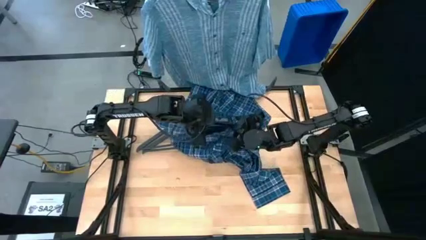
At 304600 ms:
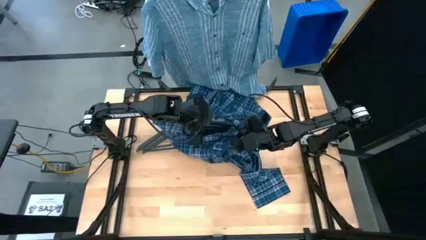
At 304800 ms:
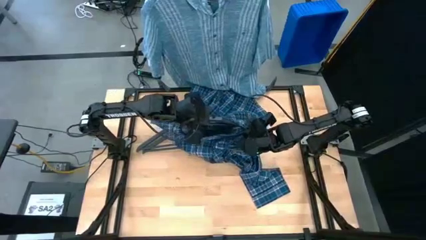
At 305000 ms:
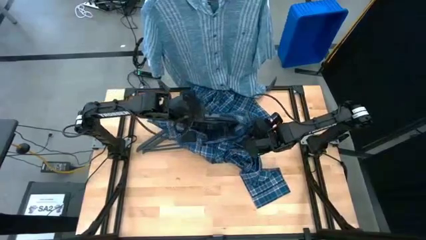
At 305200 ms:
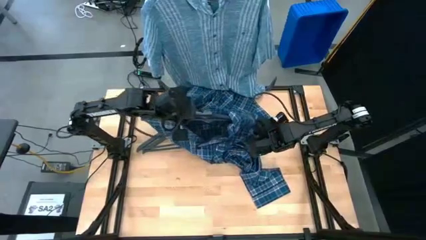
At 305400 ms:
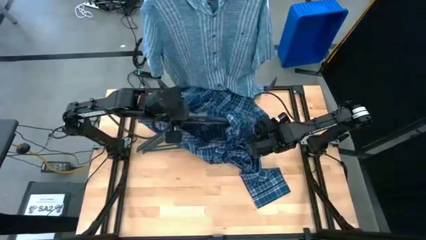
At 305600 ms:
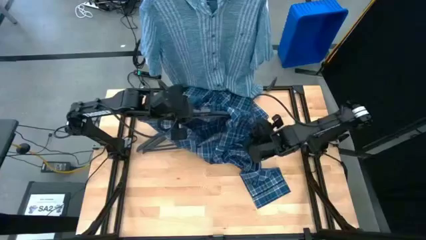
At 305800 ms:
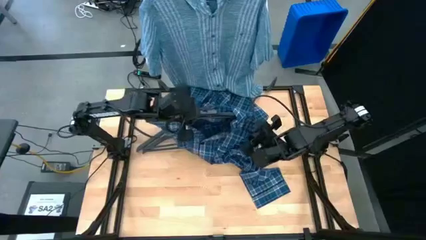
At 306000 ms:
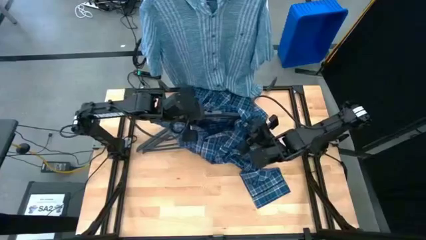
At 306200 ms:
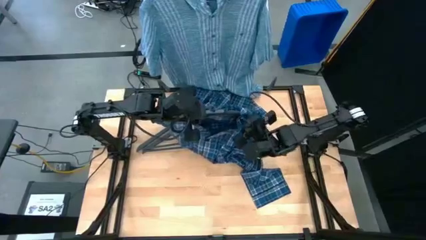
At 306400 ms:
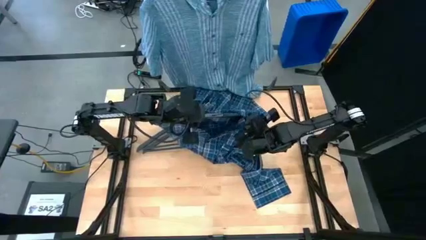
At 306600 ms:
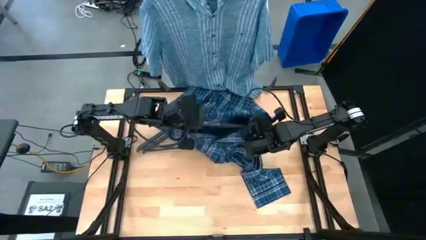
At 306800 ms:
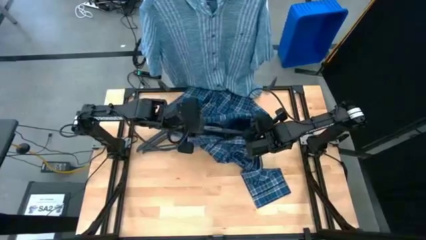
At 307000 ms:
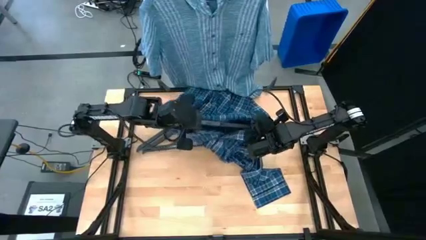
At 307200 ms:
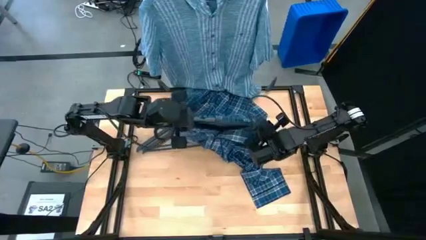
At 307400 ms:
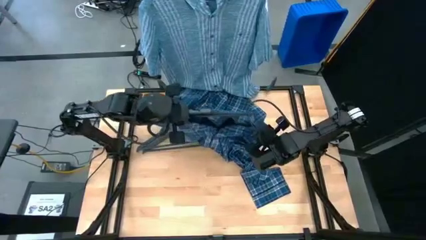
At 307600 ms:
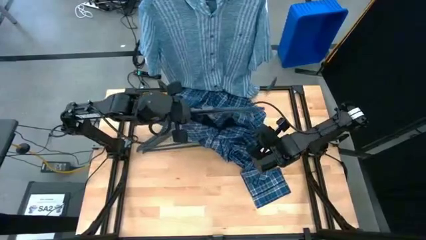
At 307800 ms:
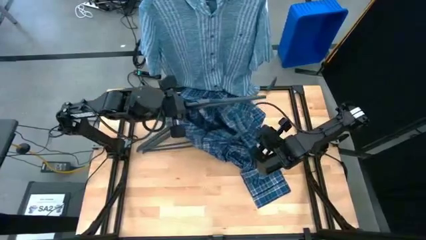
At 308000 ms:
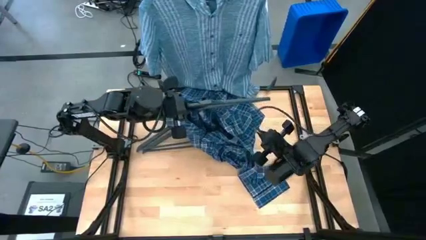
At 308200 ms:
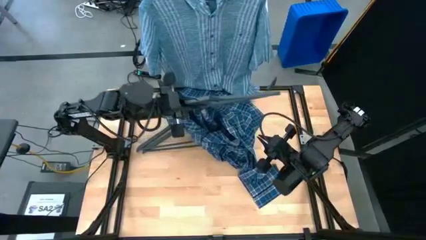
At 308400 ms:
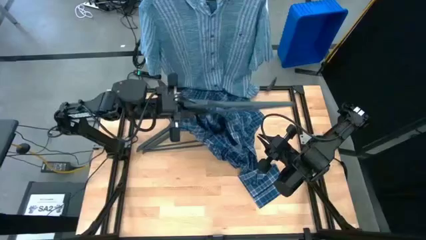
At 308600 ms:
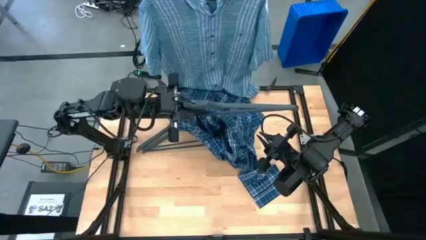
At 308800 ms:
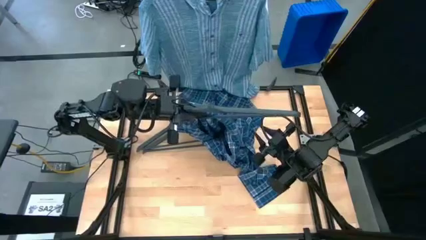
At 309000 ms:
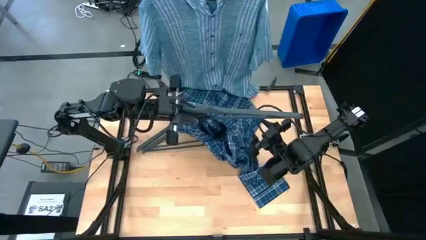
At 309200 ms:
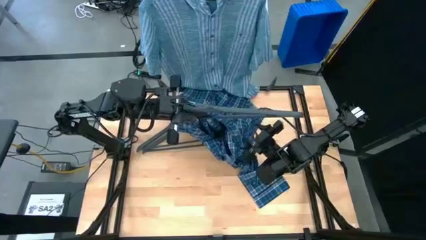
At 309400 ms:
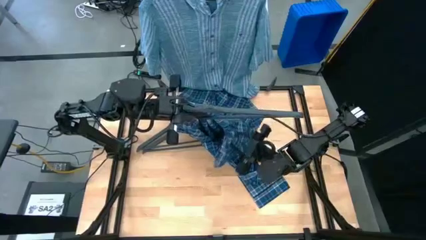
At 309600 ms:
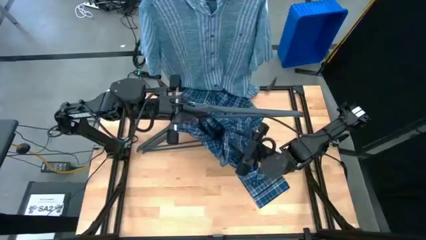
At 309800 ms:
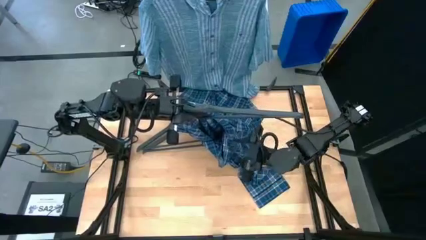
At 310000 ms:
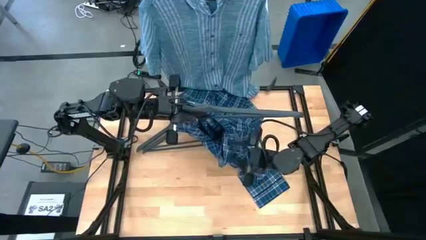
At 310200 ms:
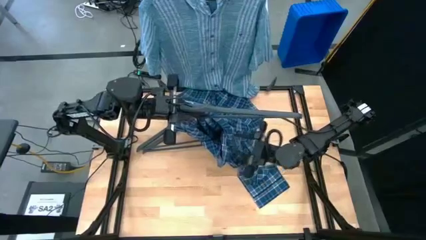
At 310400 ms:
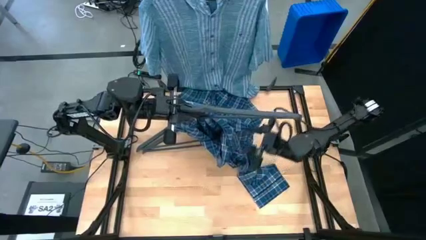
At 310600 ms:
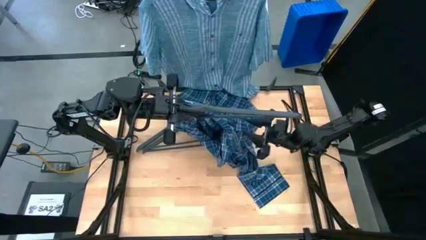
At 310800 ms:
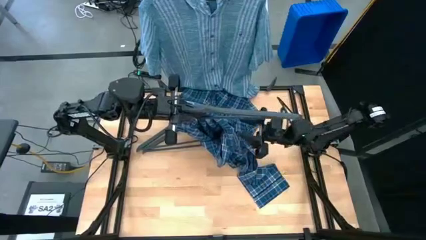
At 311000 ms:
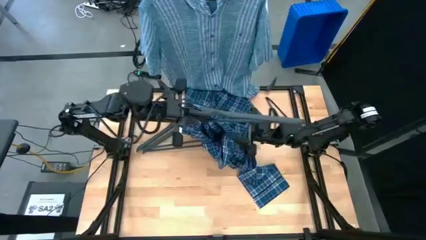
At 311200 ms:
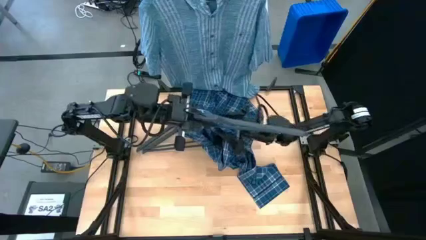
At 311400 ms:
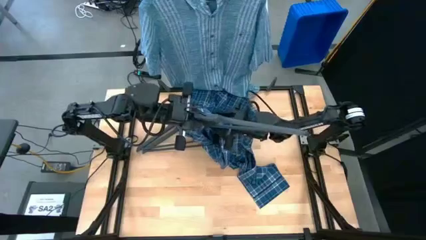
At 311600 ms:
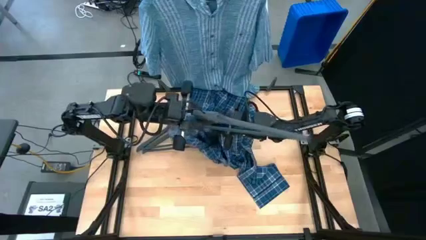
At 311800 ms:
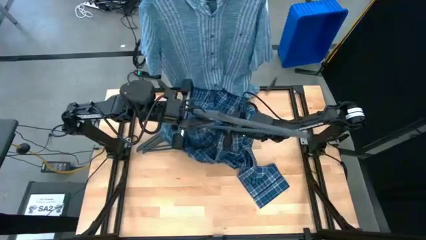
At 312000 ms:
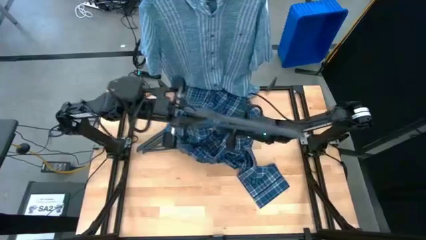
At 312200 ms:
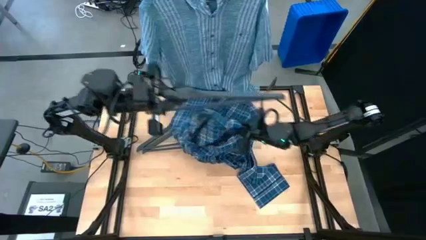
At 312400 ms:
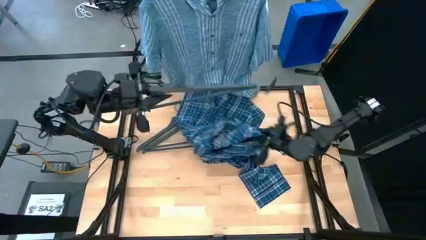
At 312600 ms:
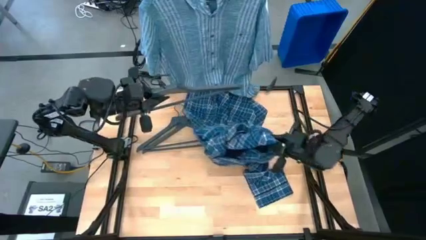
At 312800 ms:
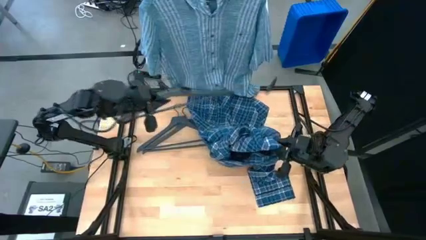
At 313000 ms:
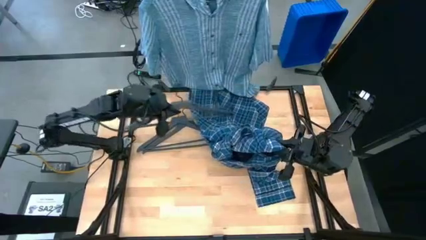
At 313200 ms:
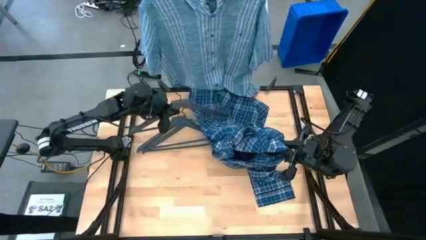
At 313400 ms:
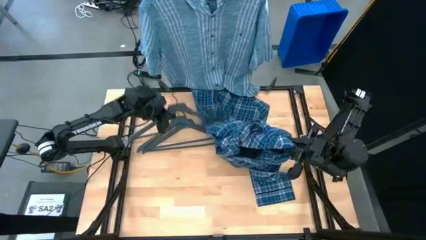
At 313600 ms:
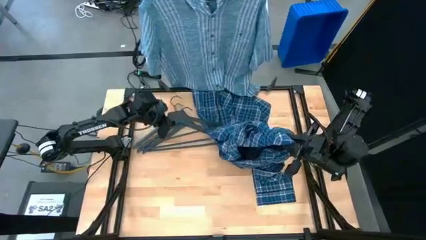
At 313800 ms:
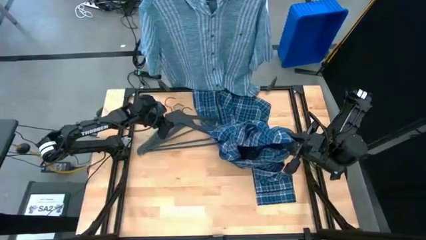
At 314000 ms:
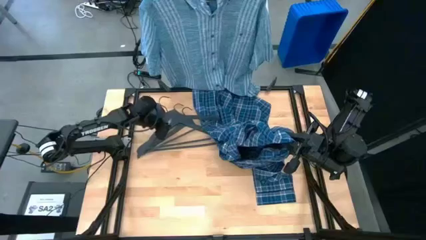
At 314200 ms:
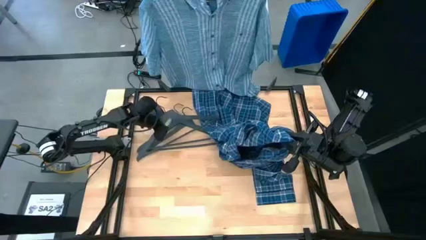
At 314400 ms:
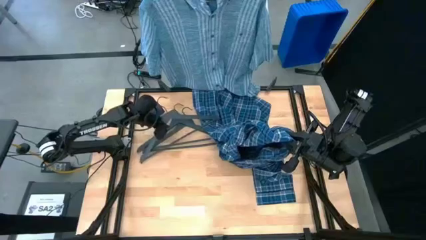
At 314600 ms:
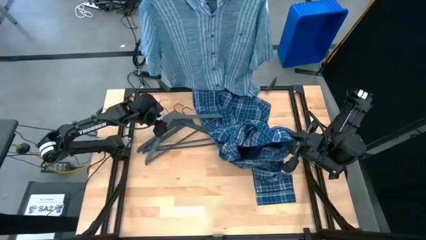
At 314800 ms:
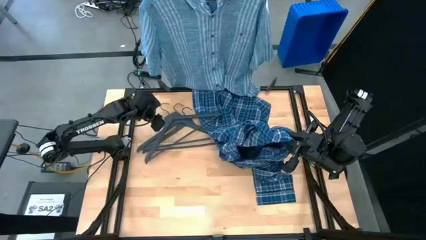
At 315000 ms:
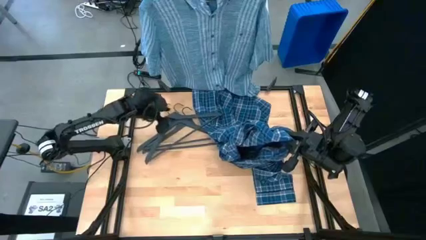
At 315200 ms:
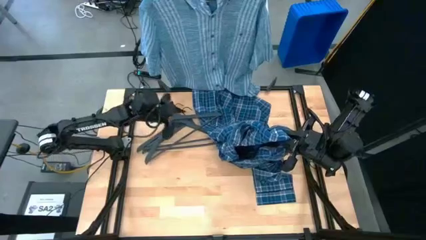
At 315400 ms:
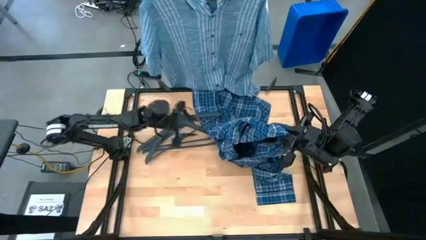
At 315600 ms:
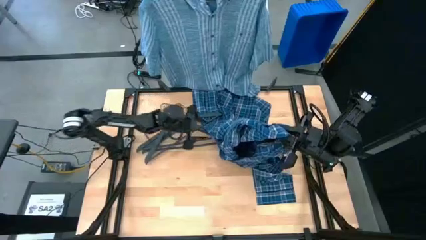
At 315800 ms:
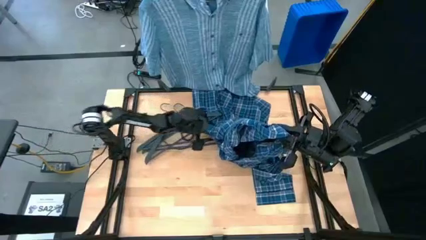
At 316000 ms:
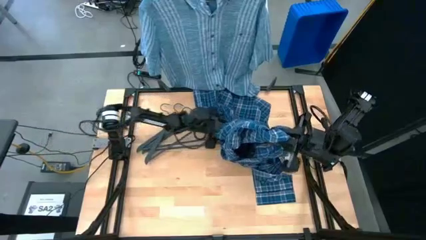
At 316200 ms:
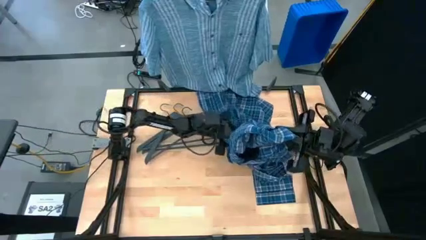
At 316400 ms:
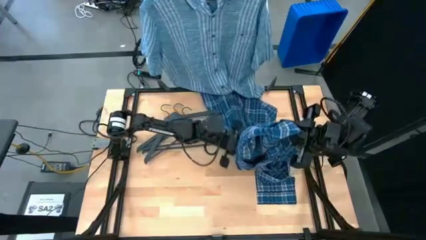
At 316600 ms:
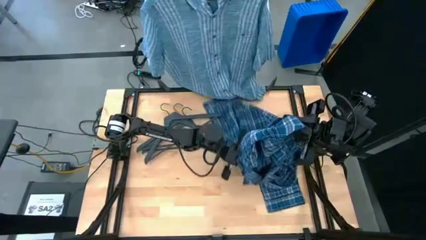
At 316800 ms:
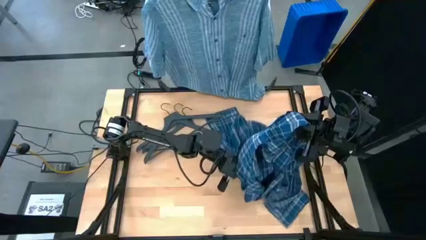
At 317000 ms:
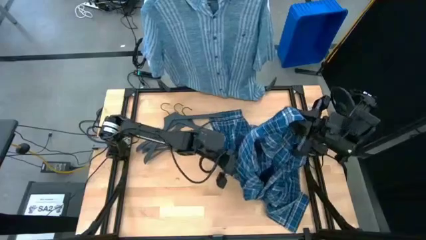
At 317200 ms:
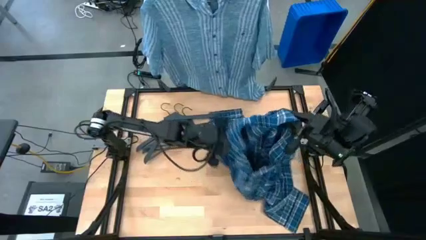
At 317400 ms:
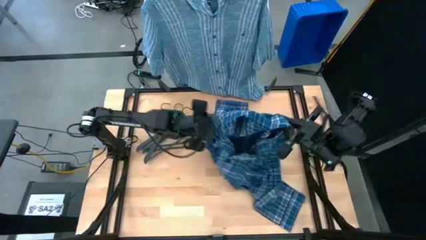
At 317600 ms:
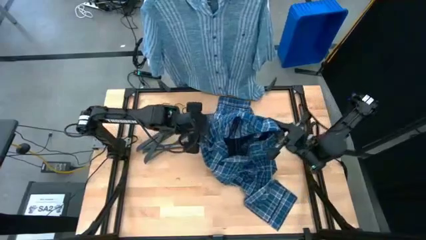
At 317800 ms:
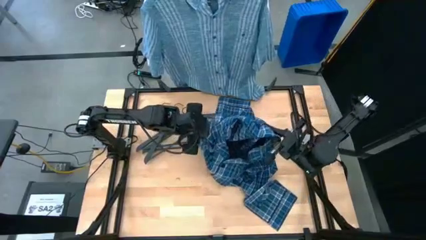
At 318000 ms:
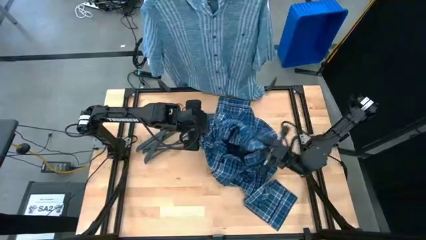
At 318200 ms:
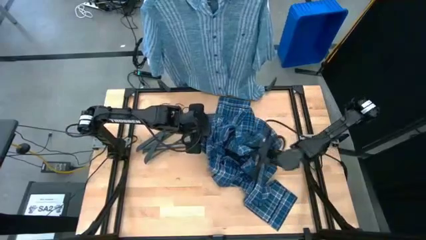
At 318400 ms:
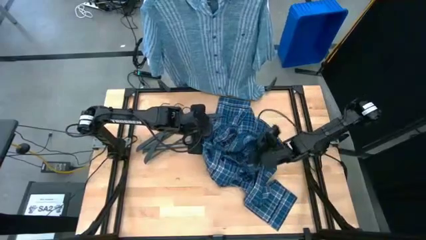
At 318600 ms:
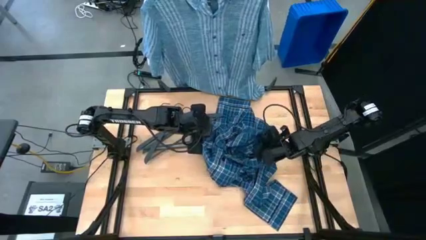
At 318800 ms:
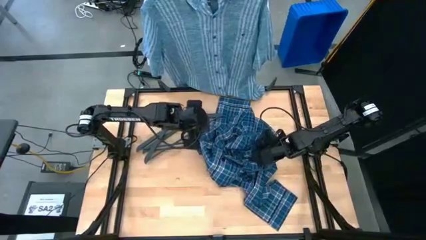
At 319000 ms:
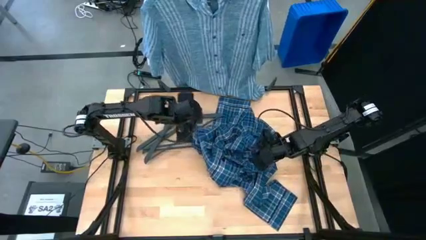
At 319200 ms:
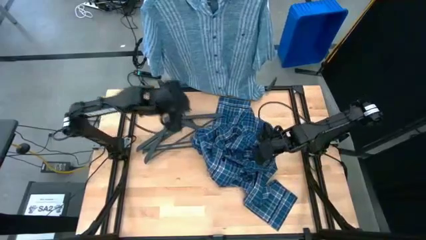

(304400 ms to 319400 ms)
Task: Hang clothes
Remove the black hanger from the blue shirt

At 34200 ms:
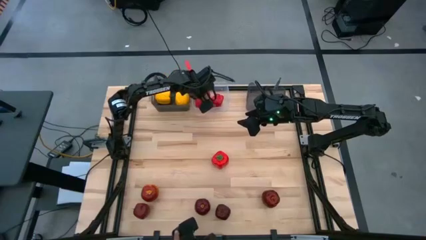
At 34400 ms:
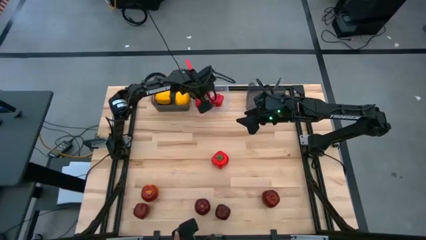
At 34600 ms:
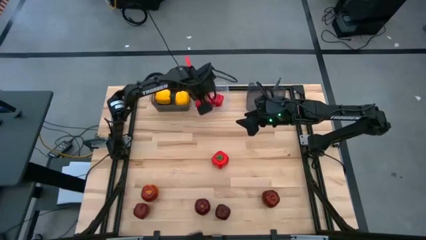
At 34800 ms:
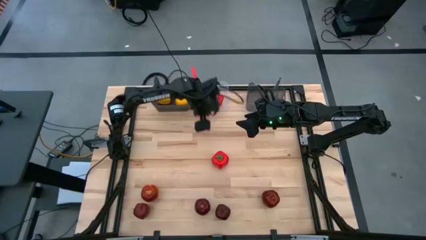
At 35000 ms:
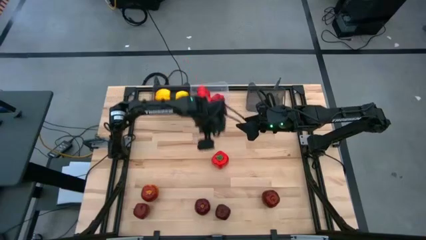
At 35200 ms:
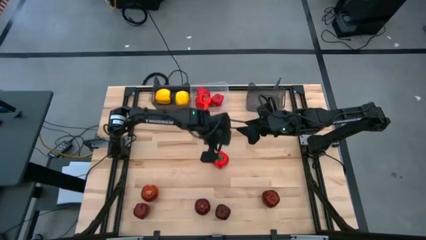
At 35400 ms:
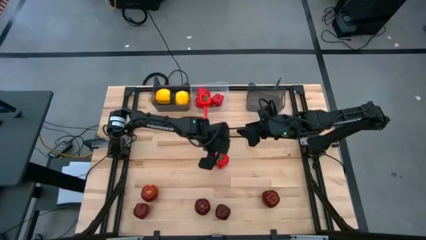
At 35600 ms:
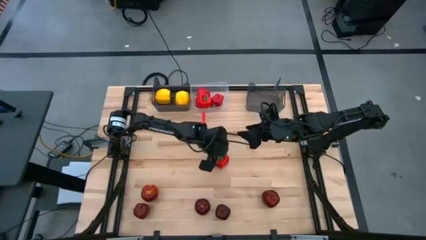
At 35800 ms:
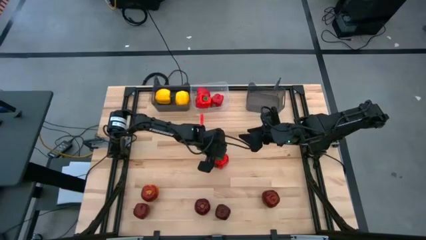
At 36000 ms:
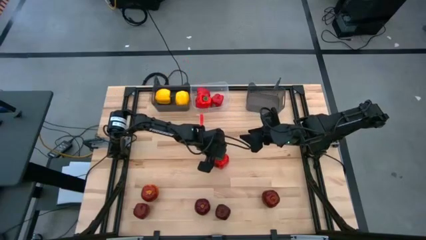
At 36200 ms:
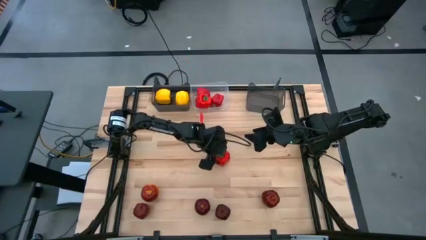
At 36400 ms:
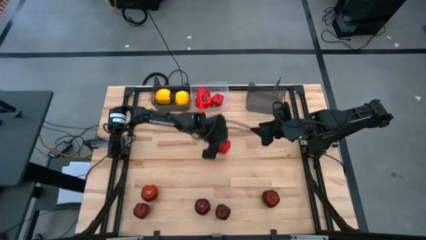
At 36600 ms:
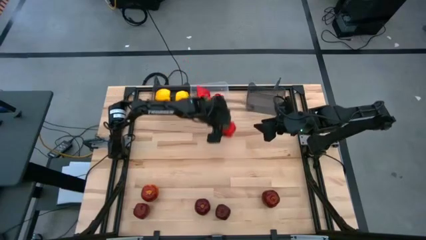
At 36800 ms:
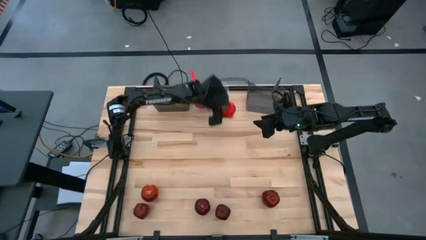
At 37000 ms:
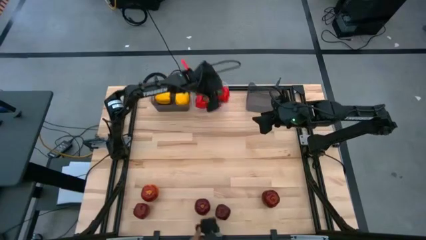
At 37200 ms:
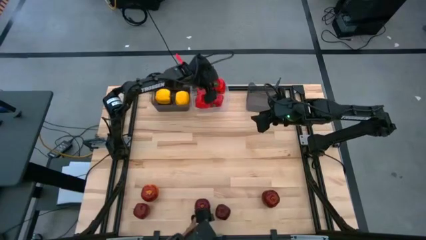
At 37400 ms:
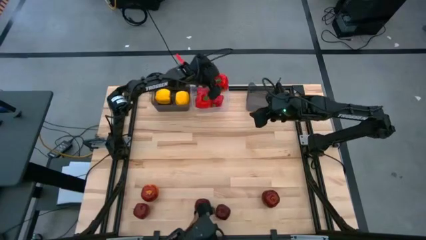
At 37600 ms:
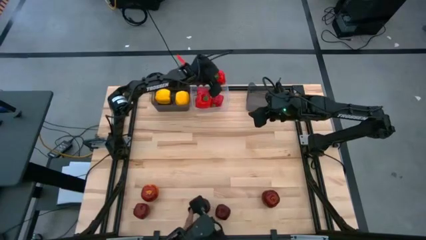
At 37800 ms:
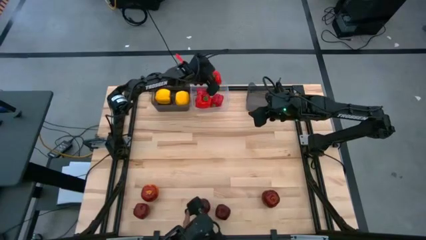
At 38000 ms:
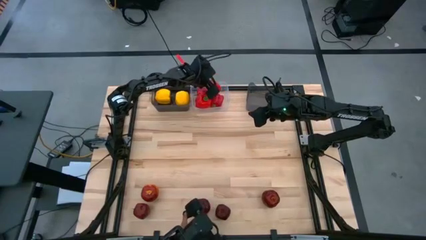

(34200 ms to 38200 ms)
Task: Sort produce into baskets
Put the red bell pepper into the transparent bin
